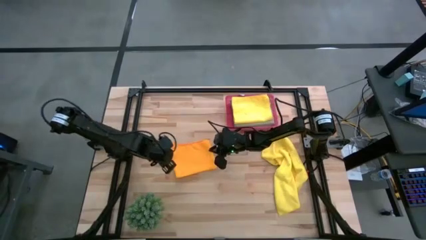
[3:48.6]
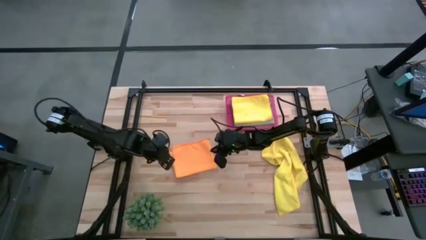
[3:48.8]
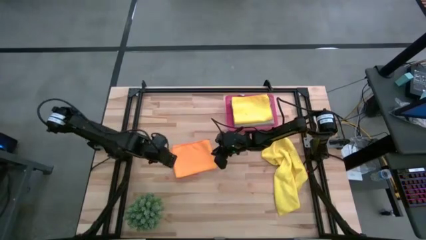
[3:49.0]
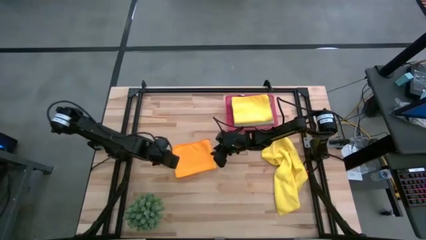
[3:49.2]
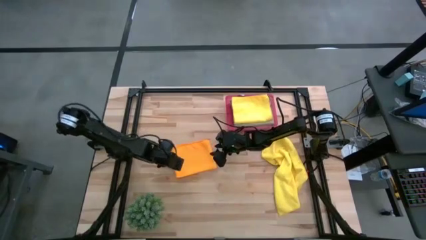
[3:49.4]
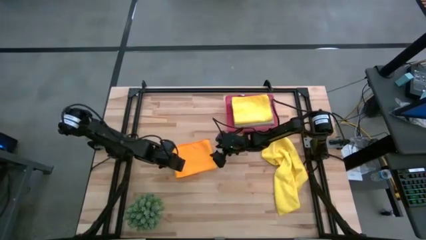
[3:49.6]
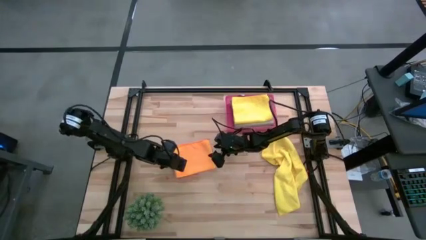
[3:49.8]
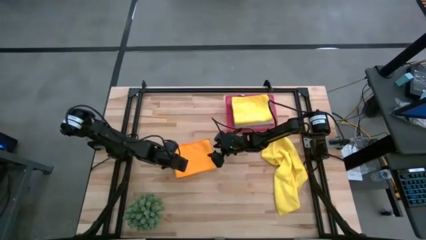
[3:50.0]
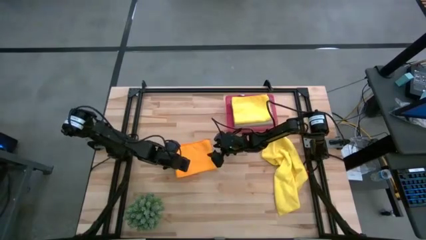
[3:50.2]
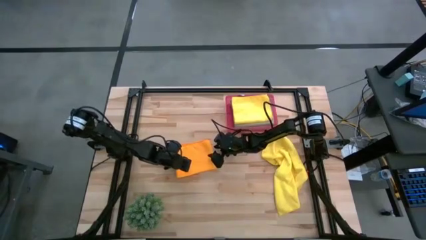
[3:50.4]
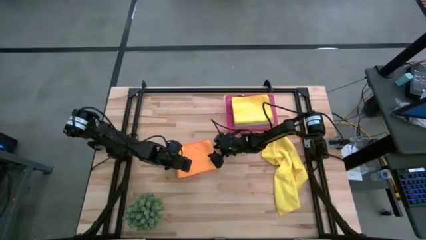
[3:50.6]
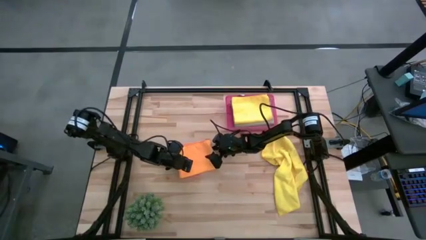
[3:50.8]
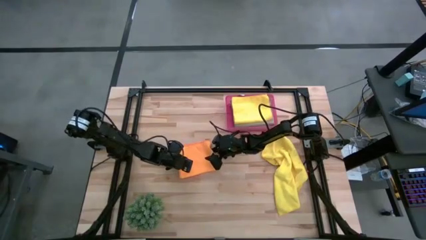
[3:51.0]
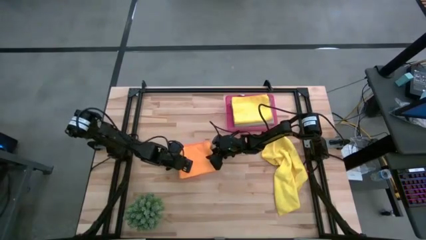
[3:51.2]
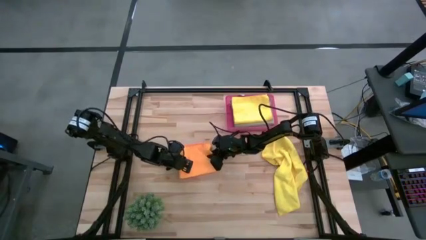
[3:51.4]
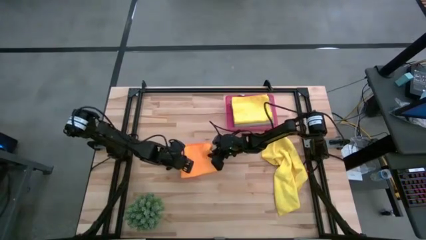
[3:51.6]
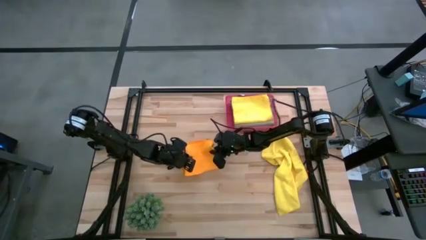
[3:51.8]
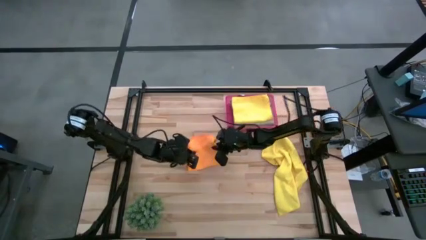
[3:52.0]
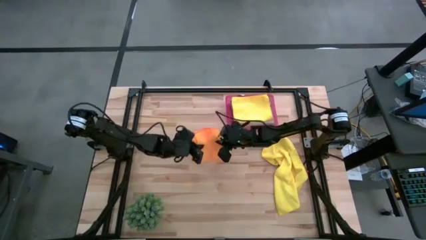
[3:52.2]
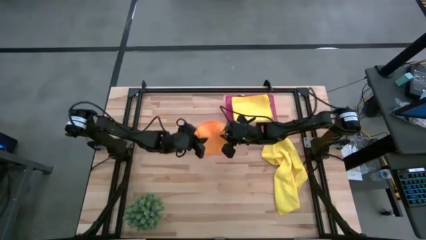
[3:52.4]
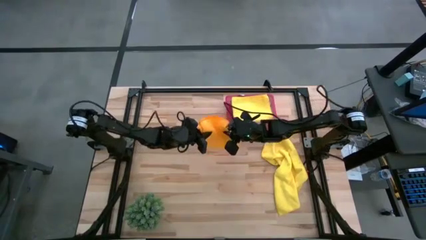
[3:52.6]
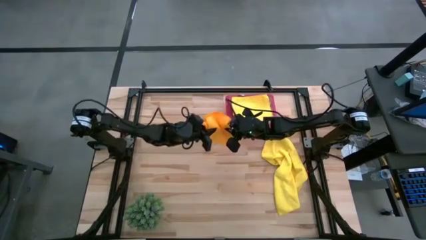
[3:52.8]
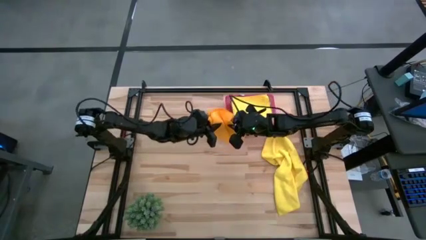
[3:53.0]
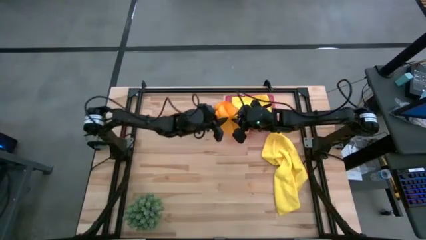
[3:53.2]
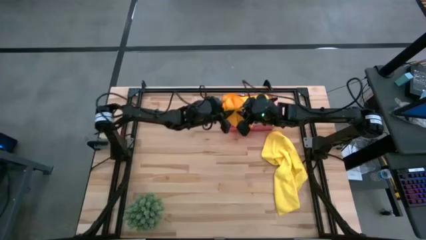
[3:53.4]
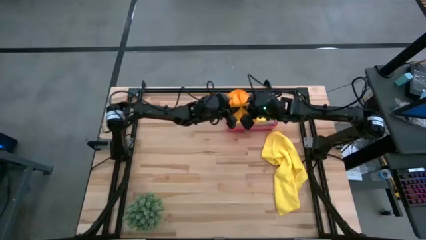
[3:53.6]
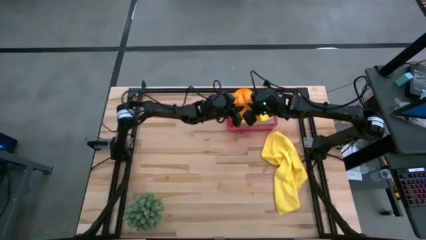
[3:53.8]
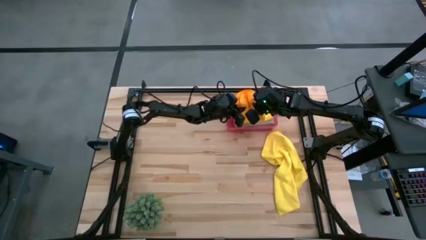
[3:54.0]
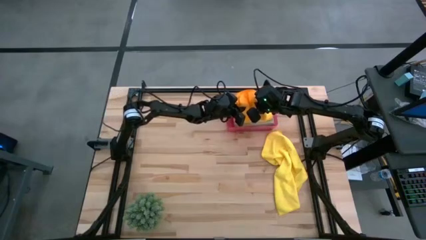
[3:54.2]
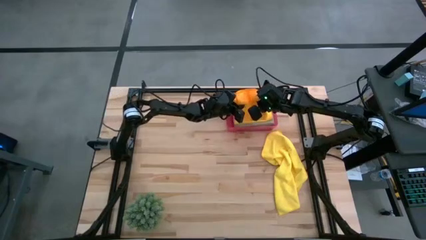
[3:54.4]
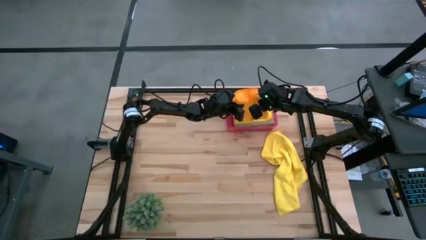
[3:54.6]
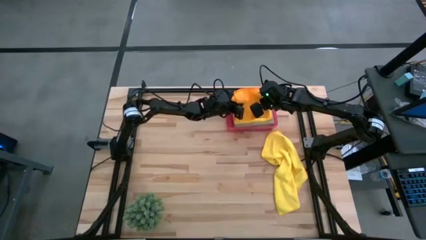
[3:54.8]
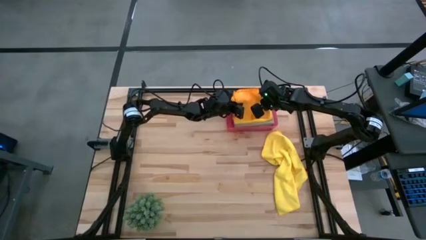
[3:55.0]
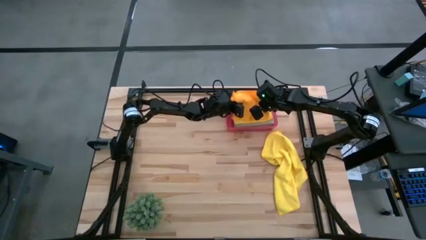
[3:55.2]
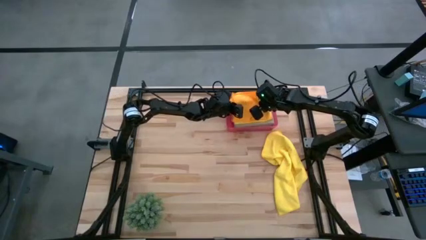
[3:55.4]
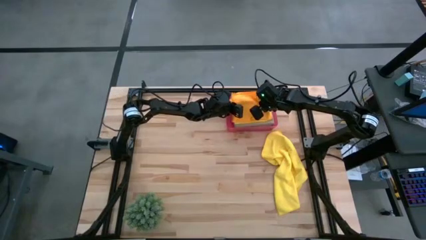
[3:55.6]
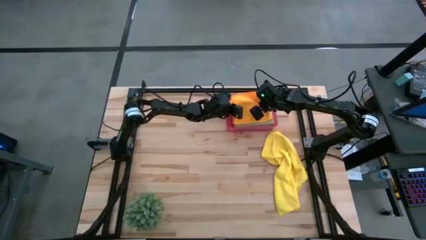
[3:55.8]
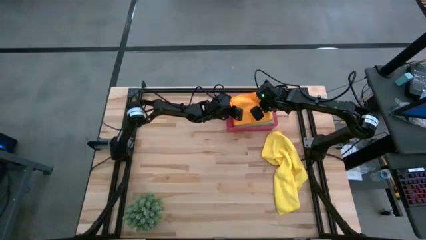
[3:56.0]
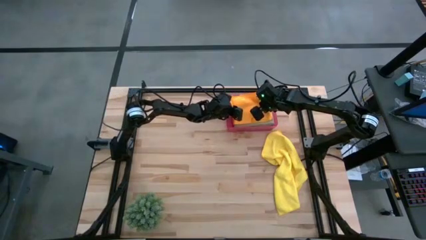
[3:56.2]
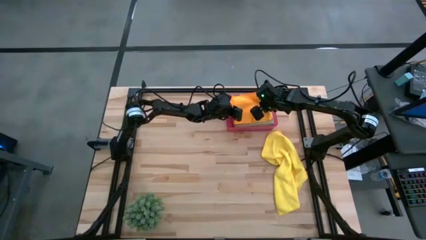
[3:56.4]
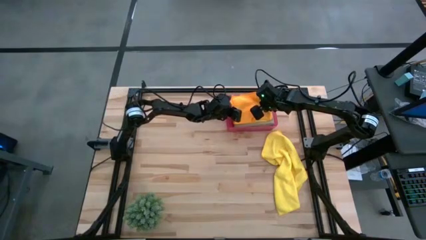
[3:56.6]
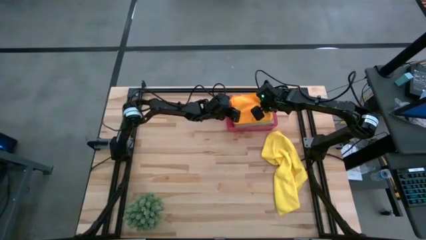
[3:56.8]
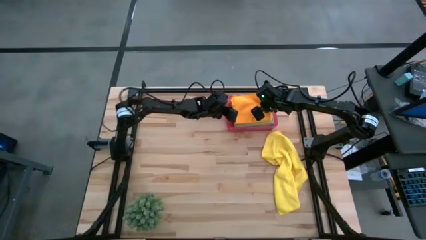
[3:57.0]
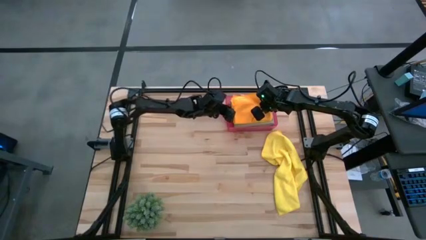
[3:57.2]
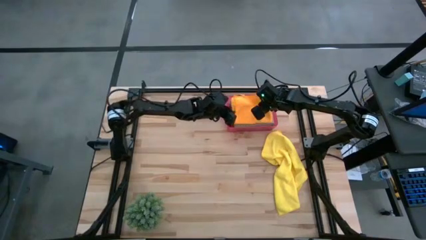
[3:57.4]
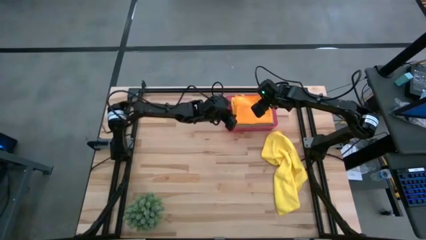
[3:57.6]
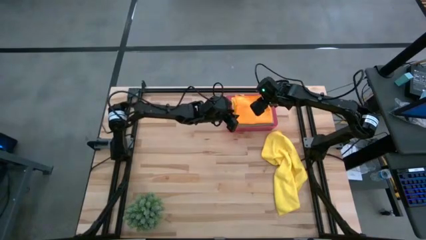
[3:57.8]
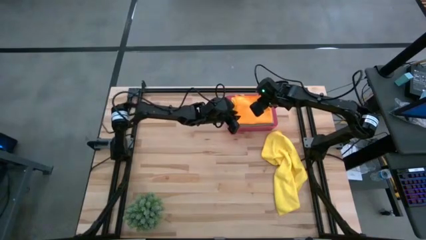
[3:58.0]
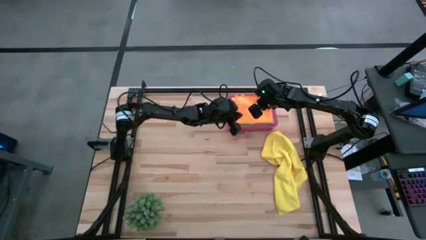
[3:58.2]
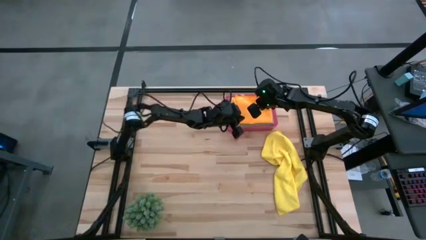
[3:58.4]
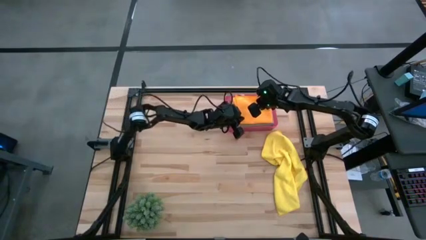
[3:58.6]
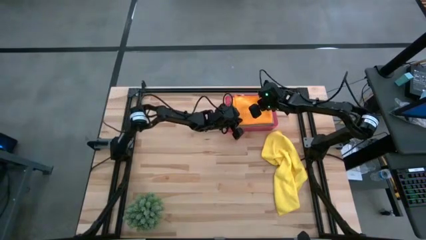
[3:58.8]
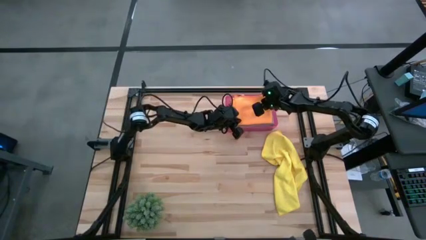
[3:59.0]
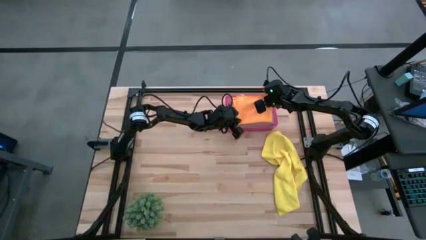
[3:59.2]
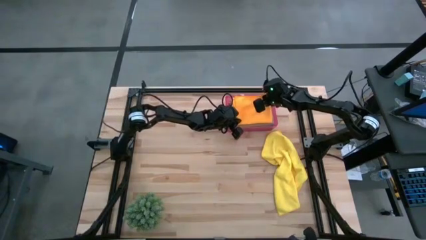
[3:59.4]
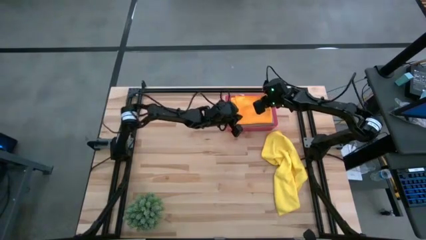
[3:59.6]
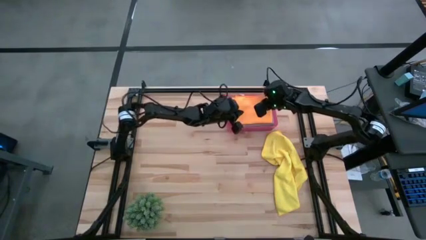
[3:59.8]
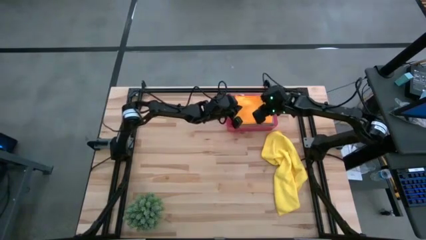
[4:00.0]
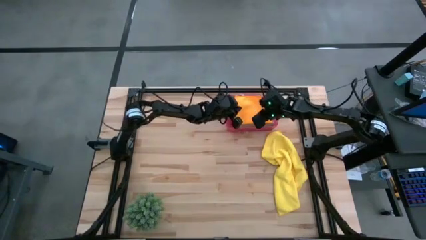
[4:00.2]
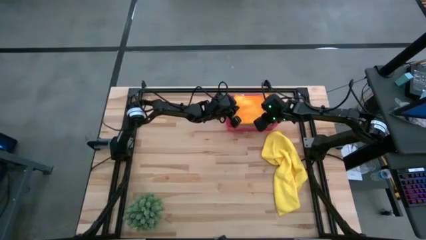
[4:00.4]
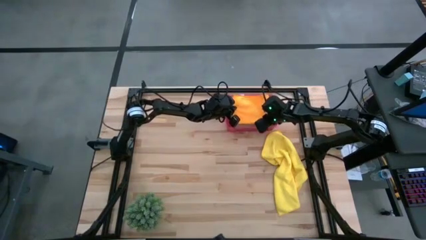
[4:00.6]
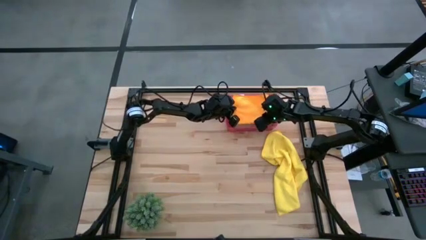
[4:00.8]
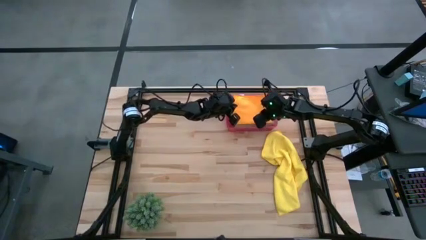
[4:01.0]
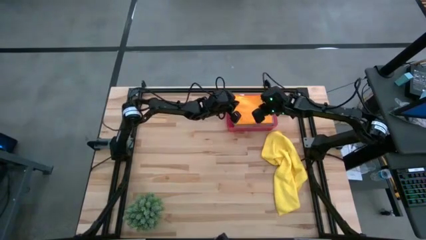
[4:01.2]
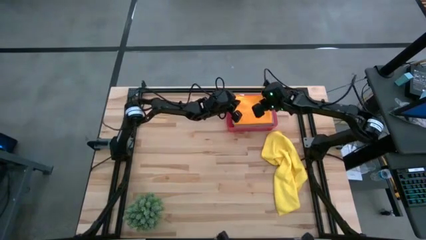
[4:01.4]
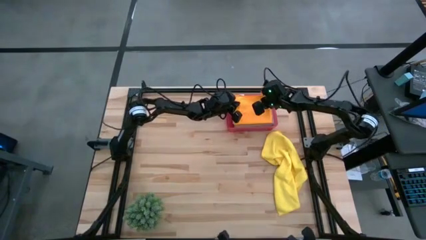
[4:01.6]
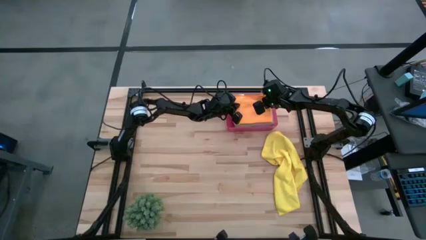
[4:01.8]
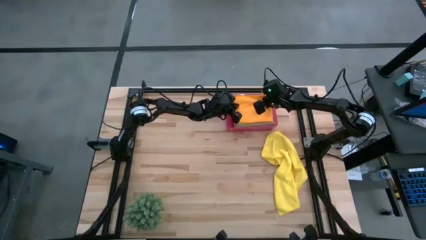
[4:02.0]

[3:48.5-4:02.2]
Task: Fold microfiber towels
Put the folded orange microfiber cloth into the red bin
